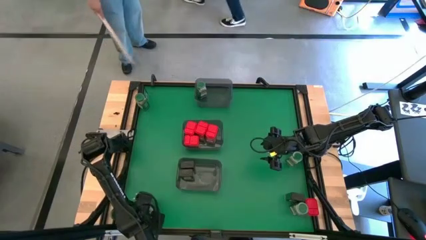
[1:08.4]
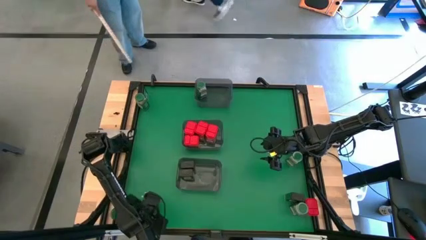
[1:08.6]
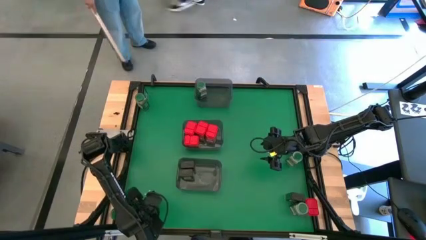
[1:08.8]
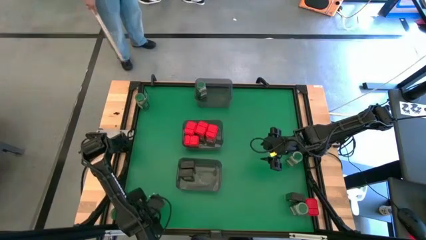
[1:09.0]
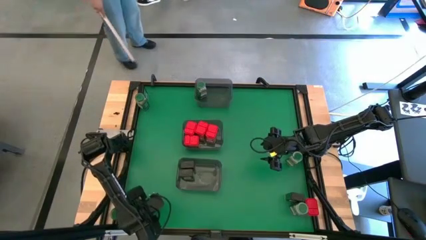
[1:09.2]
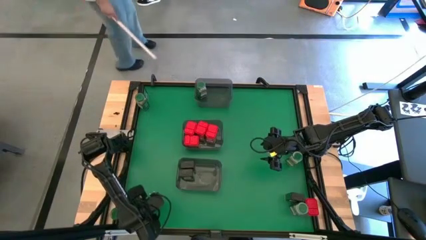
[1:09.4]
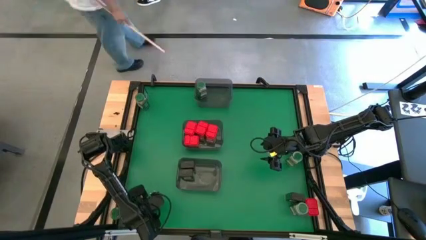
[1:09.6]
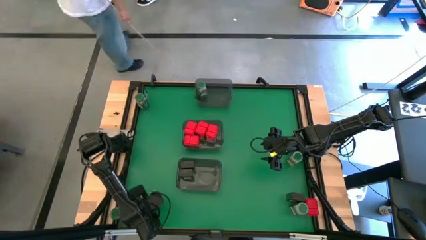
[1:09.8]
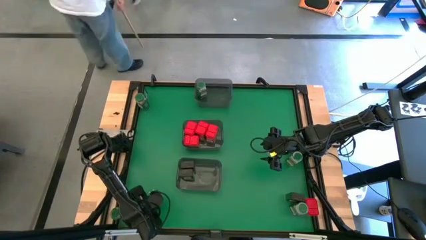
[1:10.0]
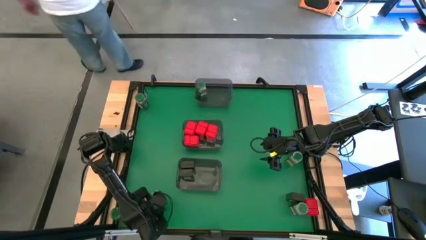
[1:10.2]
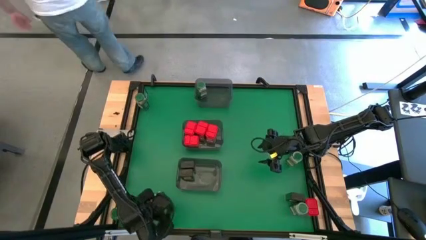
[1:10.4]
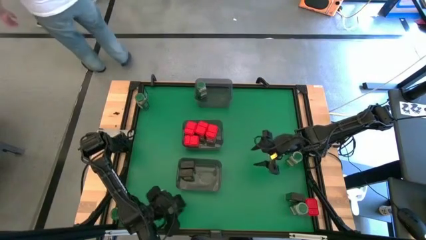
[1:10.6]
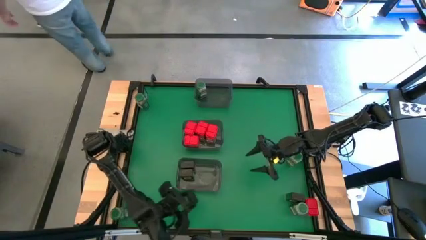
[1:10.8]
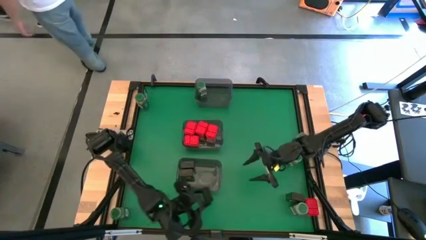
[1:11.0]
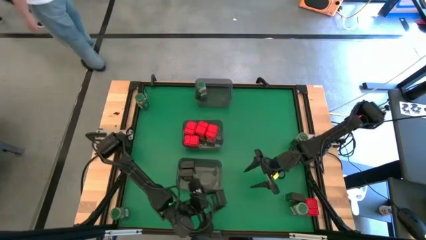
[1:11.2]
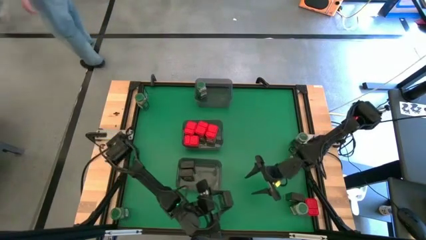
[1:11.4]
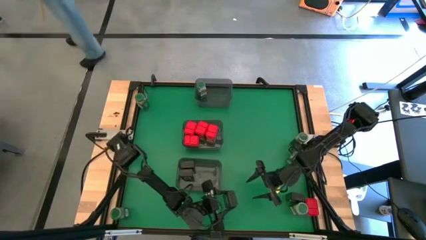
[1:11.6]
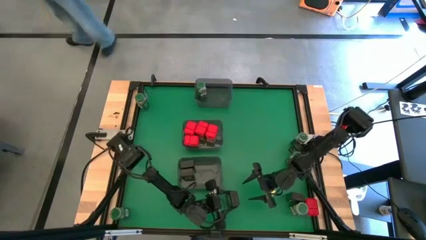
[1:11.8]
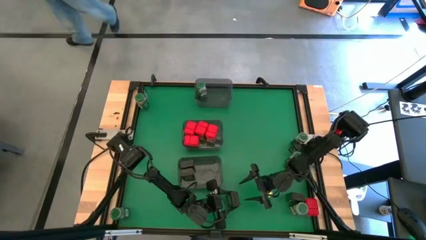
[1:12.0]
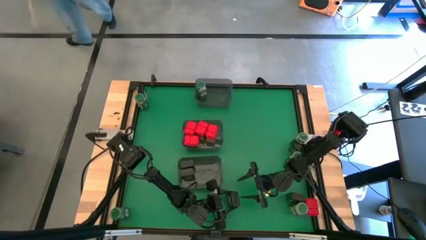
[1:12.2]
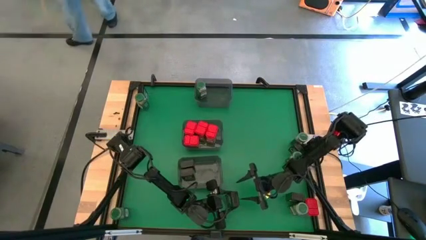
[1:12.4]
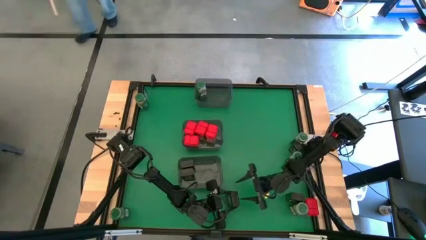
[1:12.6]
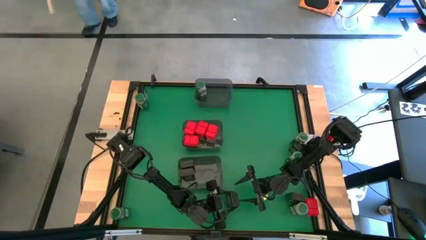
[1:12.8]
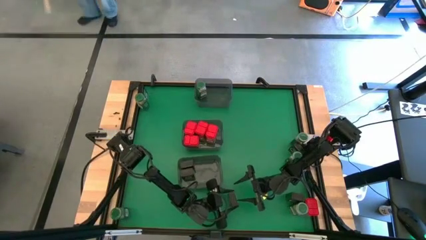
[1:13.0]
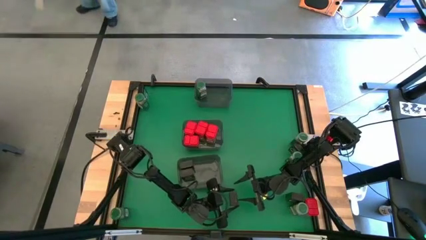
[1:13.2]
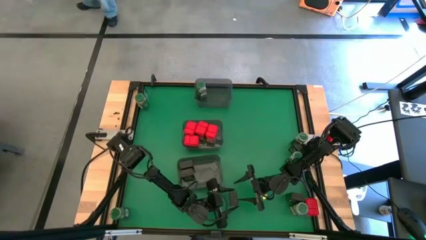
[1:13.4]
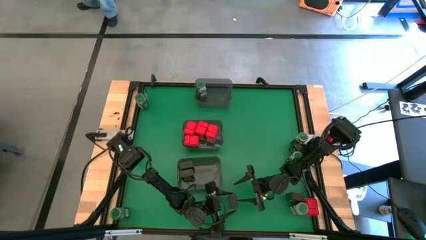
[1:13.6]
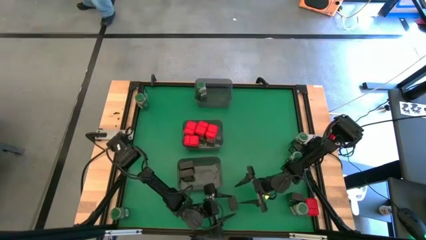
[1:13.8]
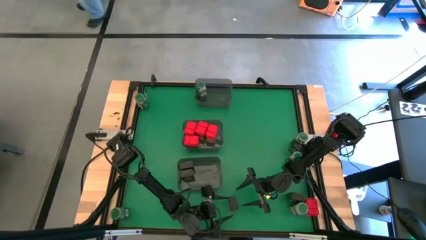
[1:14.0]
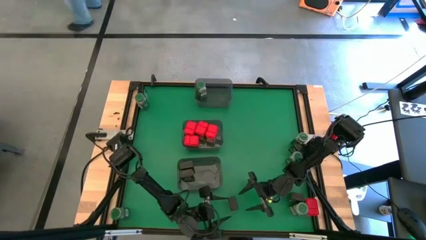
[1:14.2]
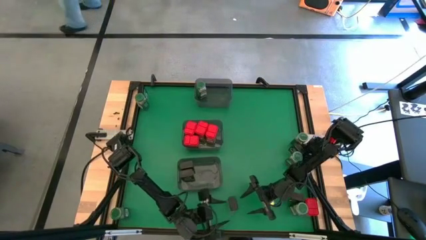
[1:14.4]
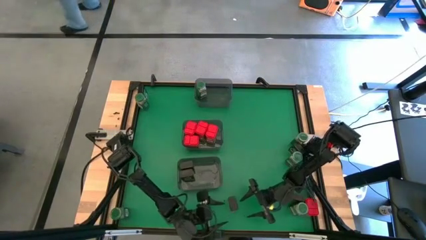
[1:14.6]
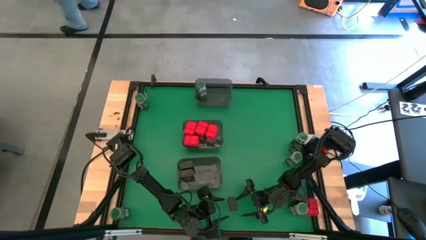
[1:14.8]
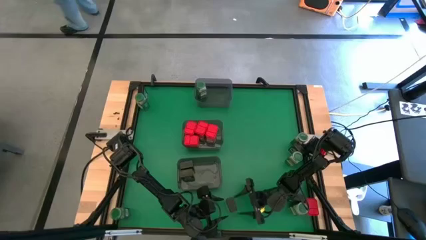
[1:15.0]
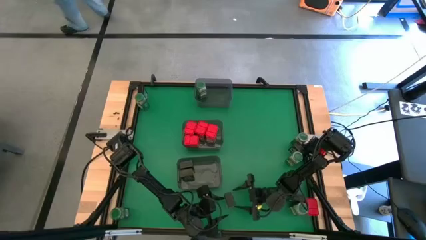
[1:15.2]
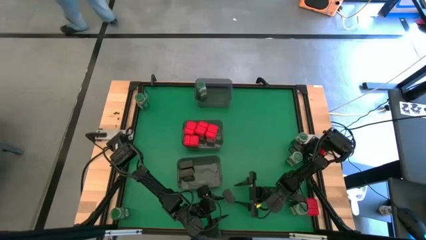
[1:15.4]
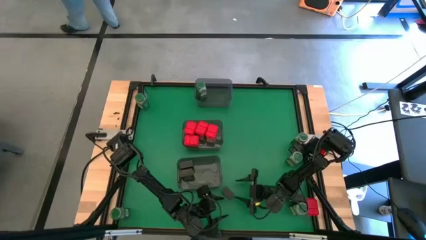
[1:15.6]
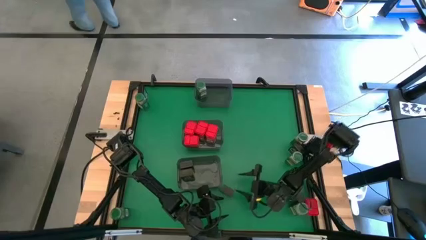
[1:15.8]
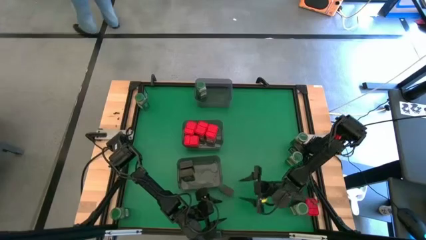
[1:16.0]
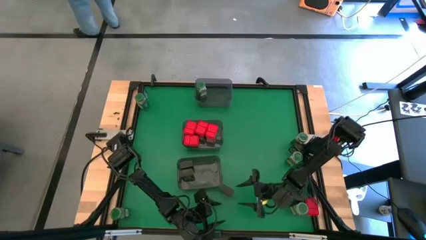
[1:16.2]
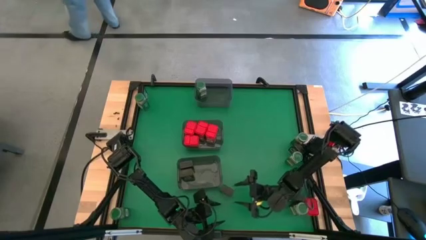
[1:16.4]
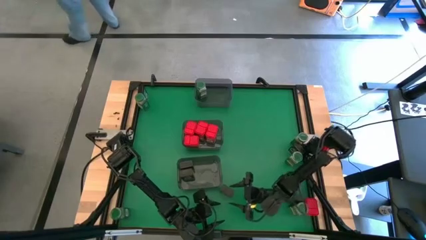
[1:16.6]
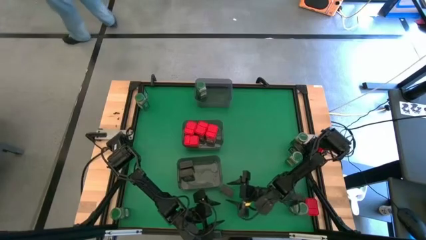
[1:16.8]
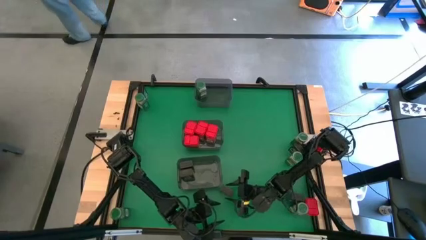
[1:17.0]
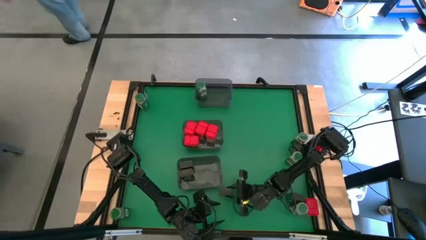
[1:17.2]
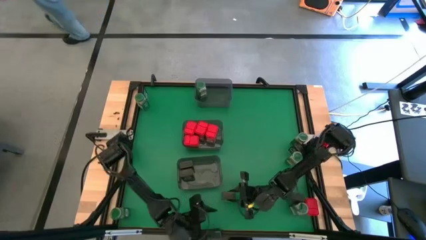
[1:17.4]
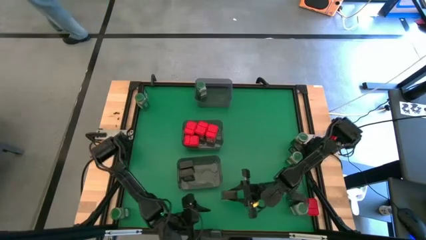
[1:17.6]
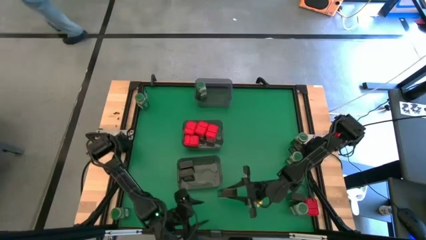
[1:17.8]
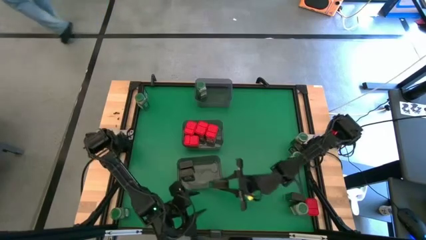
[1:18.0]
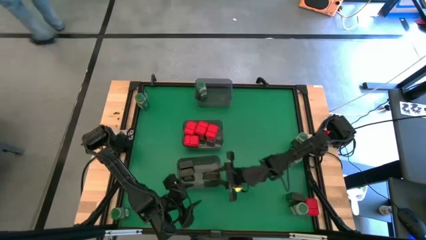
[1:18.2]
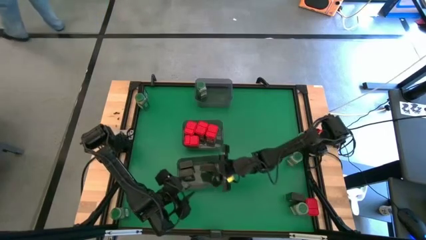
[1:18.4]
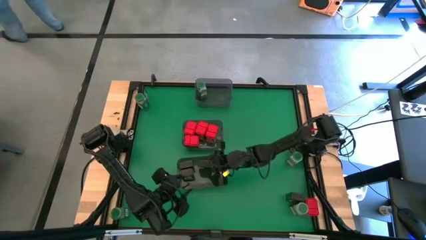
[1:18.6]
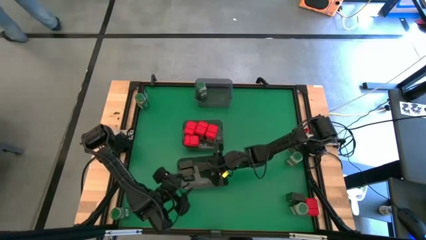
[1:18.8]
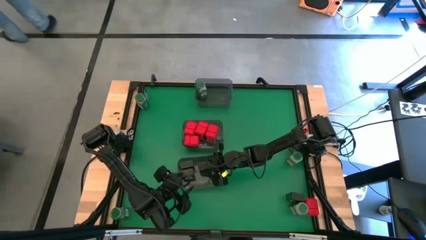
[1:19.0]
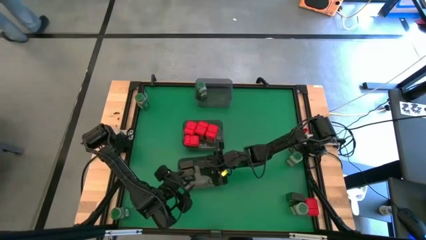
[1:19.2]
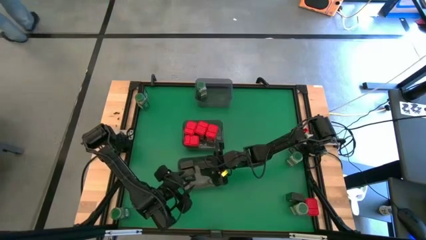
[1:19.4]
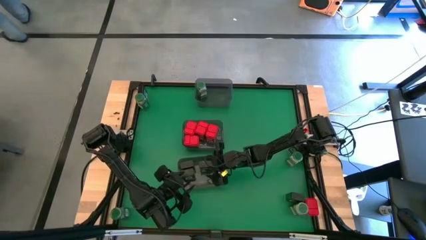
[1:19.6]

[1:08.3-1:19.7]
Task: Sort spices by type
Put the black seasoning can into the bottom gray bin

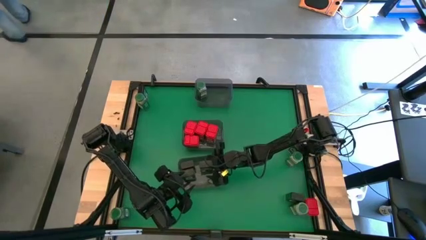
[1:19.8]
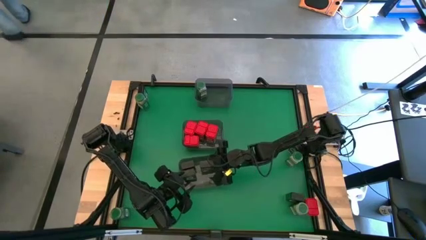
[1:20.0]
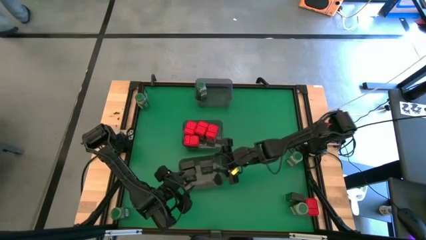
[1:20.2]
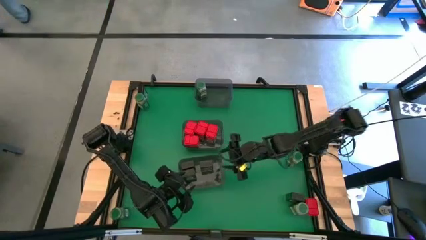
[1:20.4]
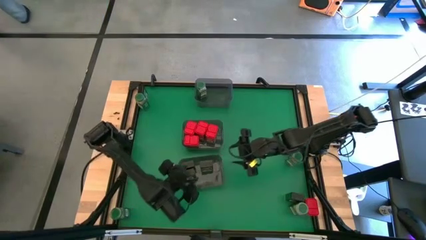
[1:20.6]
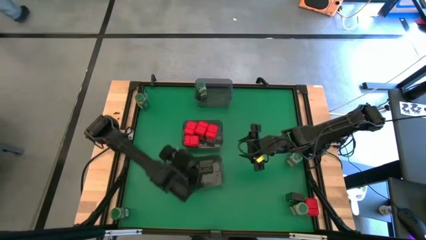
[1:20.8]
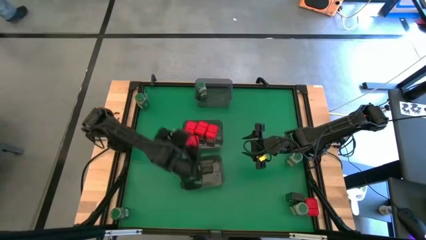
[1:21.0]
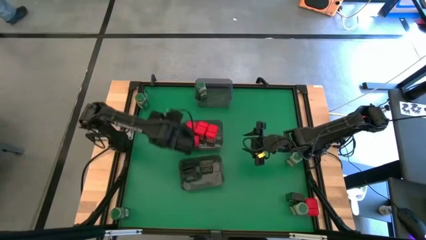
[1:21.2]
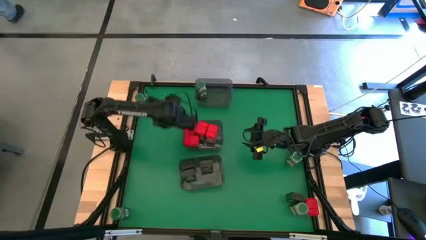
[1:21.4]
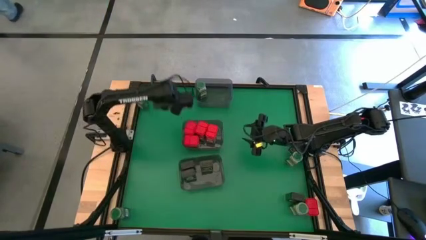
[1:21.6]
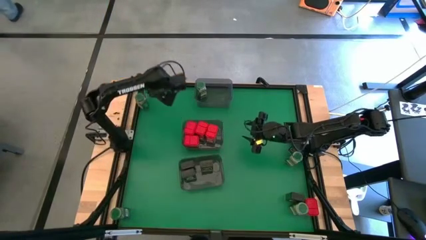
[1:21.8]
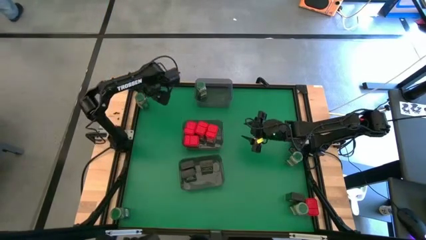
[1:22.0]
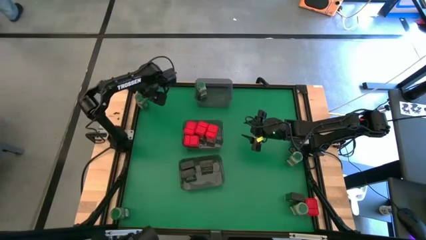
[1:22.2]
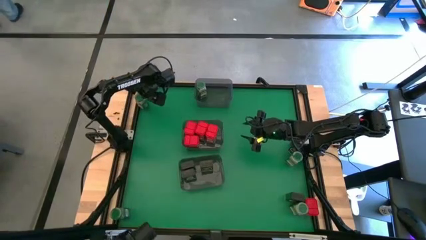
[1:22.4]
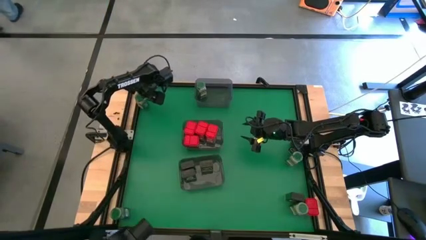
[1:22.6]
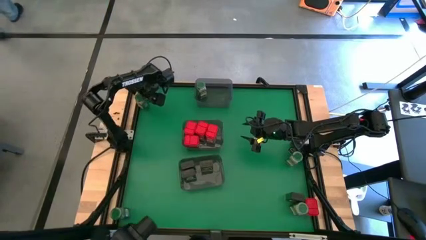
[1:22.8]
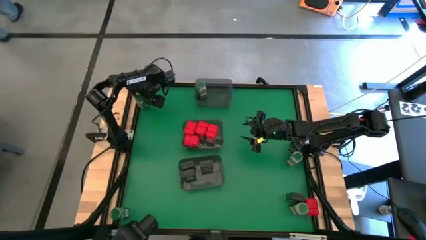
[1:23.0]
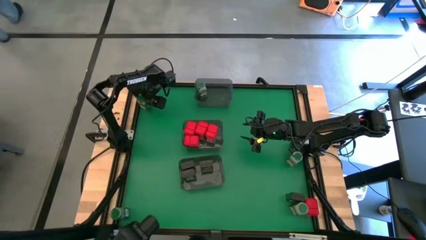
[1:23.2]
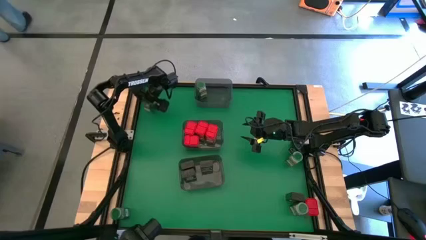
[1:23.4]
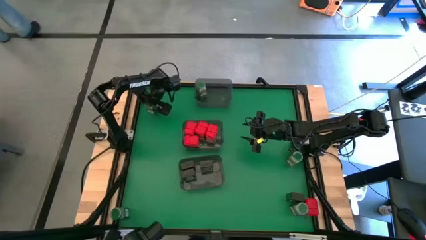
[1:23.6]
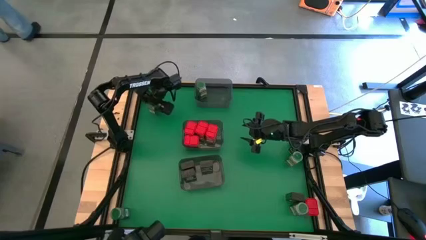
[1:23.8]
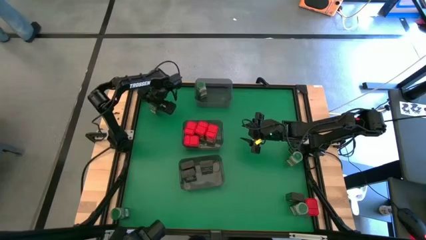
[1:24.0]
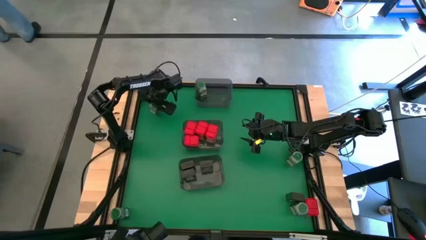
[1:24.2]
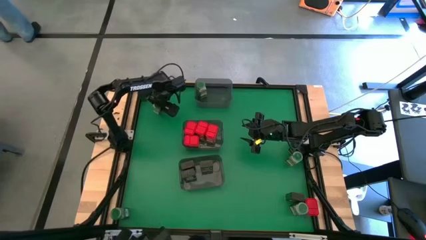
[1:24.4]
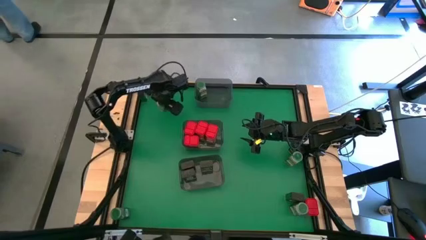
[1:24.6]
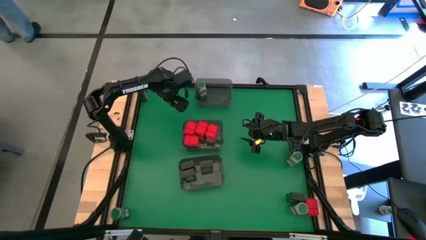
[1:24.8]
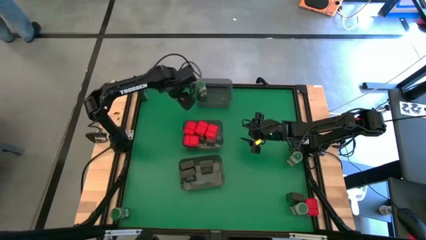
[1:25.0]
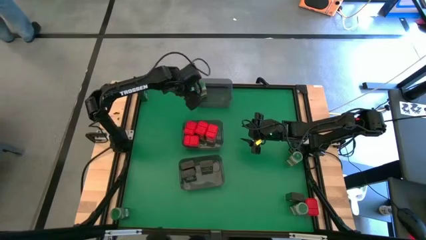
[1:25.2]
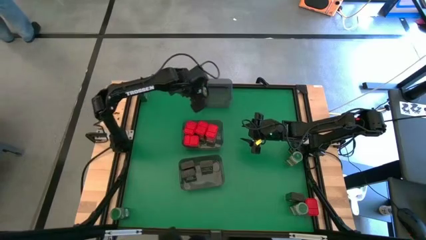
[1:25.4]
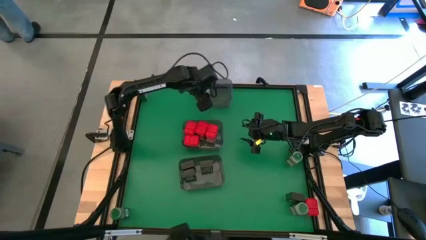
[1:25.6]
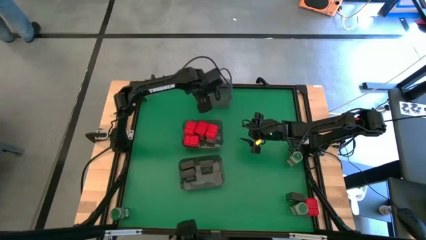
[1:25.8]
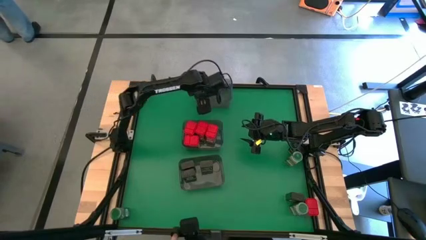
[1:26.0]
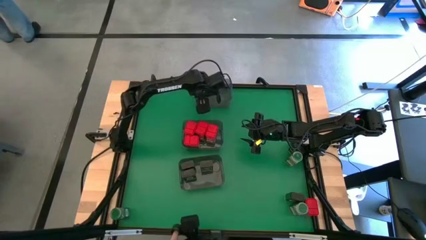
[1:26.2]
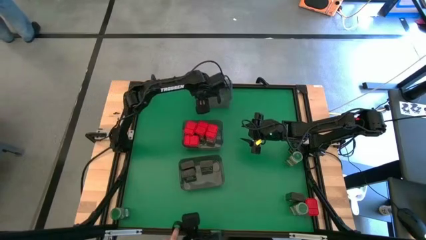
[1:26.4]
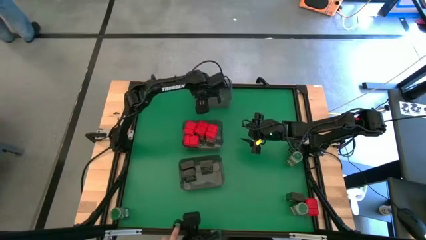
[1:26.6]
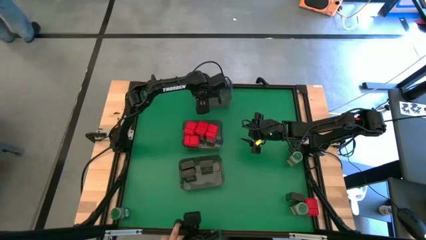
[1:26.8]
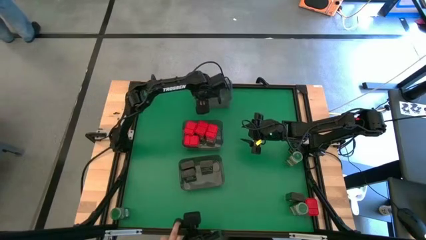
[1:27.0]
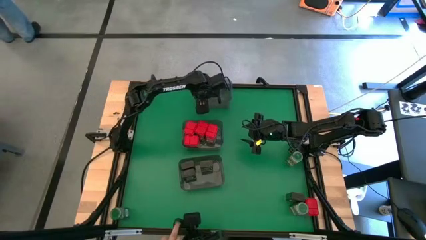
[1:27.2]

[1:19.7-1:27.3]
Put the green seasoning bottle into the top gray bin
